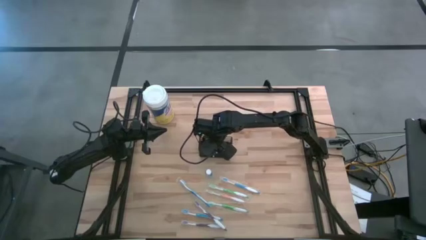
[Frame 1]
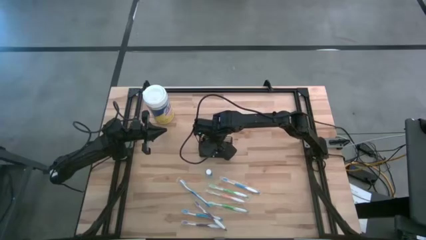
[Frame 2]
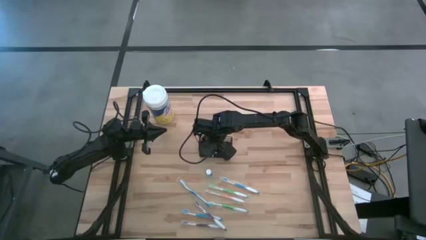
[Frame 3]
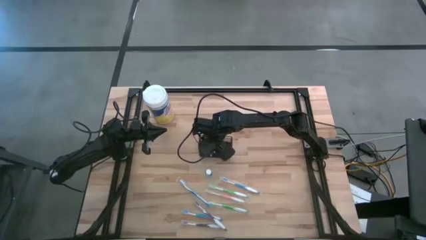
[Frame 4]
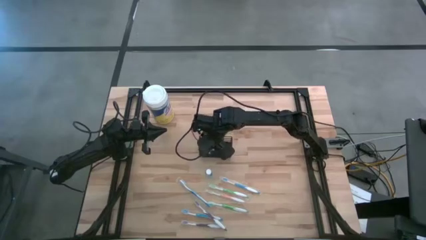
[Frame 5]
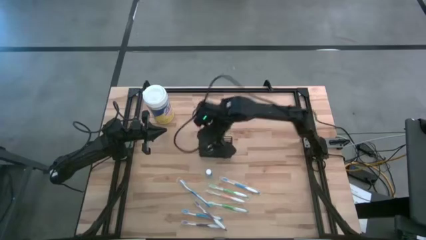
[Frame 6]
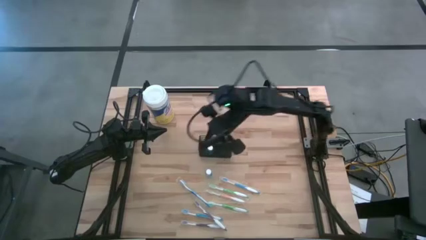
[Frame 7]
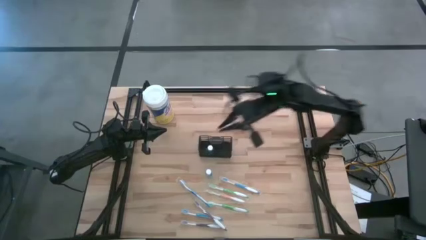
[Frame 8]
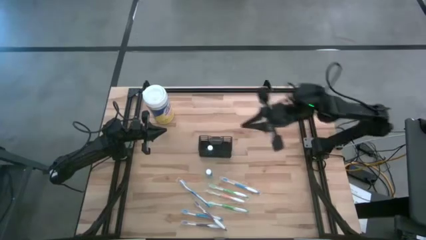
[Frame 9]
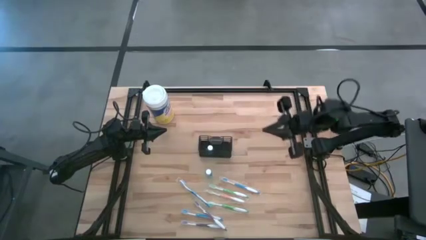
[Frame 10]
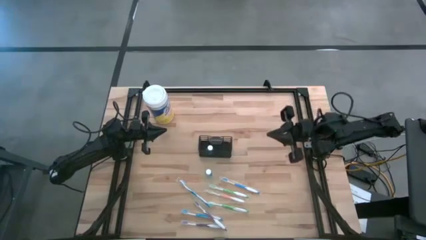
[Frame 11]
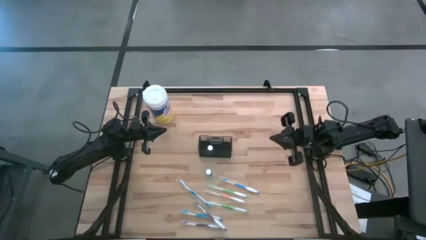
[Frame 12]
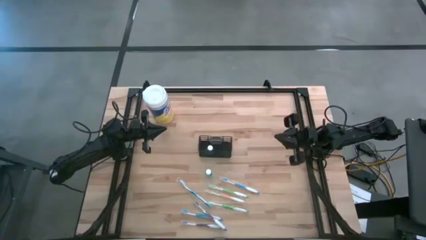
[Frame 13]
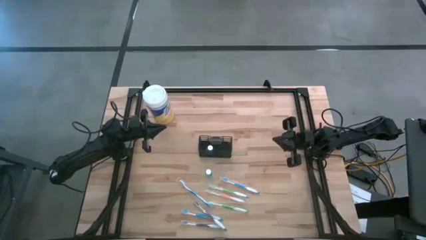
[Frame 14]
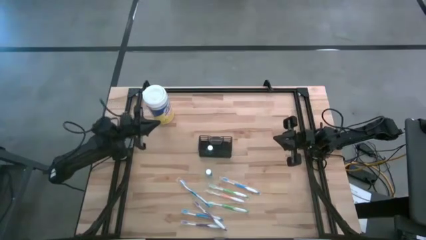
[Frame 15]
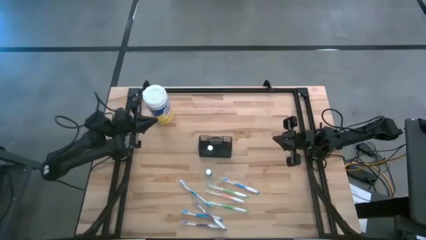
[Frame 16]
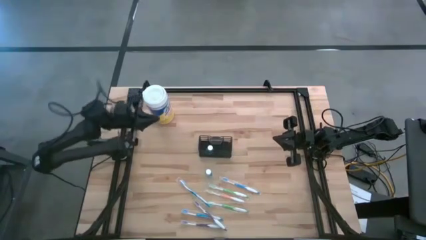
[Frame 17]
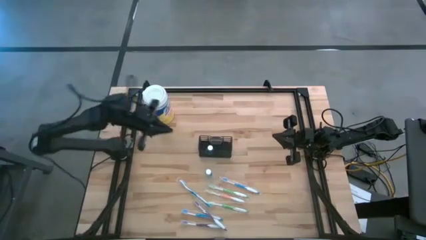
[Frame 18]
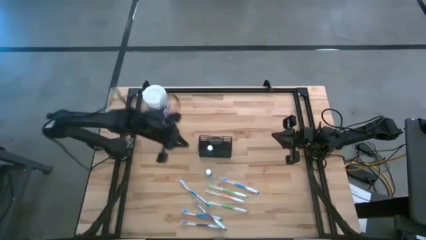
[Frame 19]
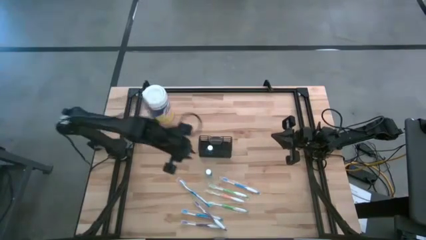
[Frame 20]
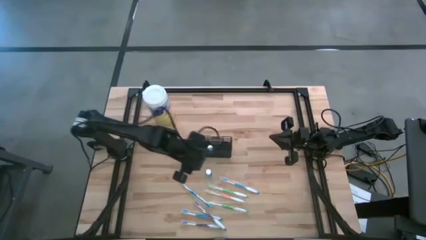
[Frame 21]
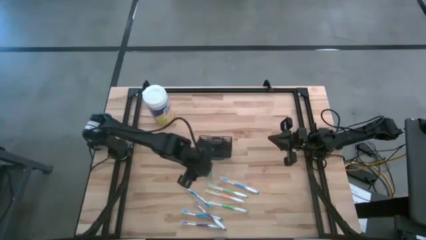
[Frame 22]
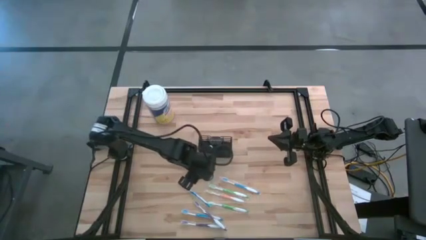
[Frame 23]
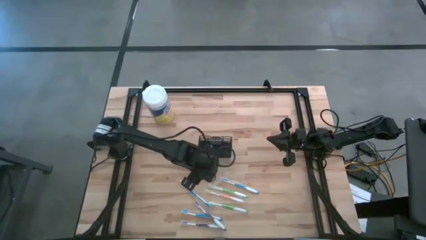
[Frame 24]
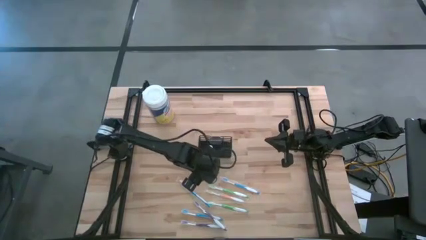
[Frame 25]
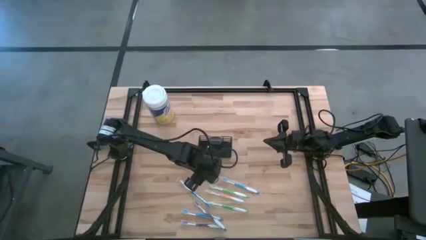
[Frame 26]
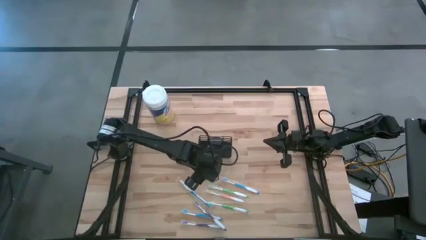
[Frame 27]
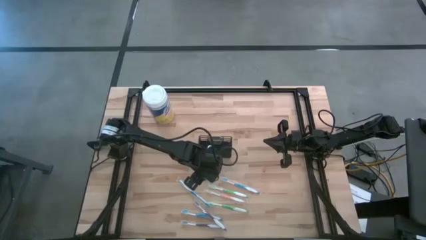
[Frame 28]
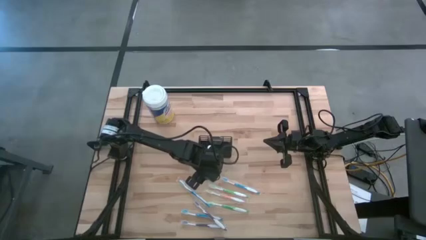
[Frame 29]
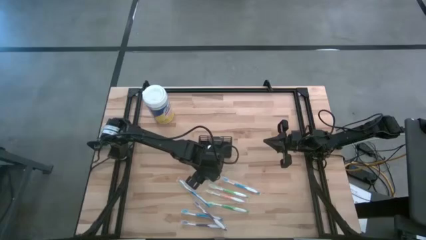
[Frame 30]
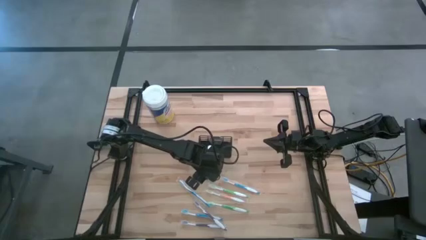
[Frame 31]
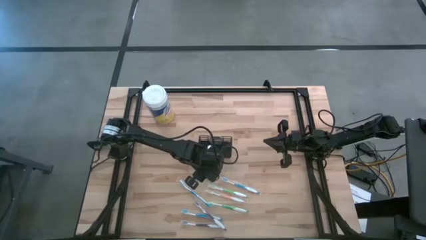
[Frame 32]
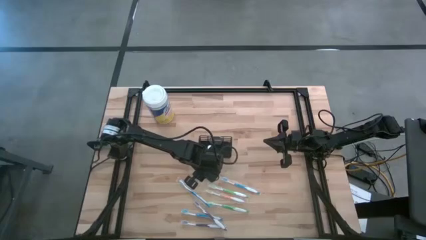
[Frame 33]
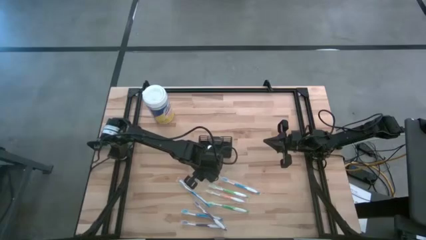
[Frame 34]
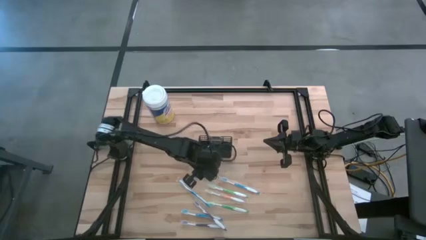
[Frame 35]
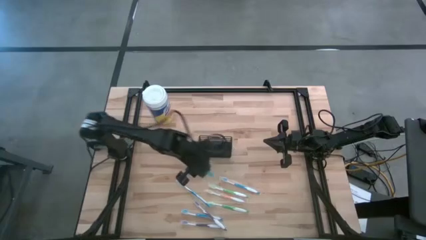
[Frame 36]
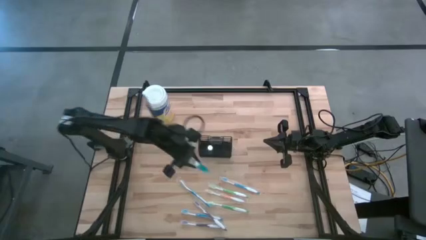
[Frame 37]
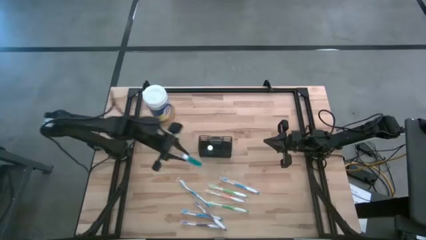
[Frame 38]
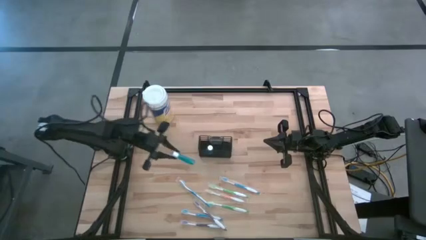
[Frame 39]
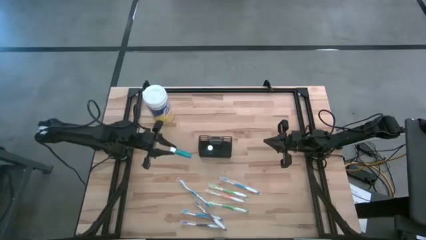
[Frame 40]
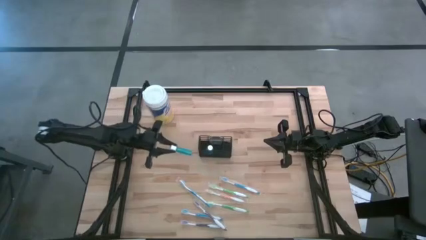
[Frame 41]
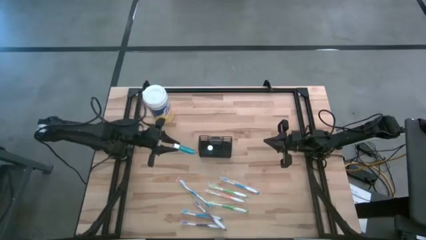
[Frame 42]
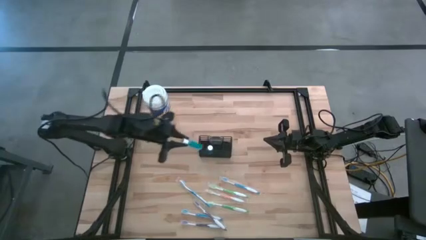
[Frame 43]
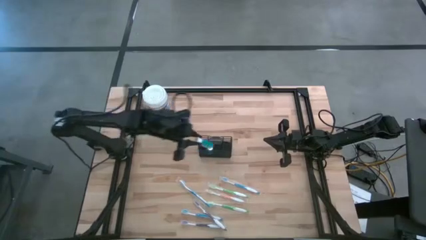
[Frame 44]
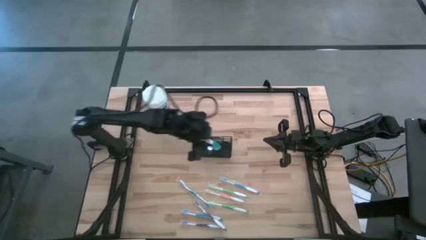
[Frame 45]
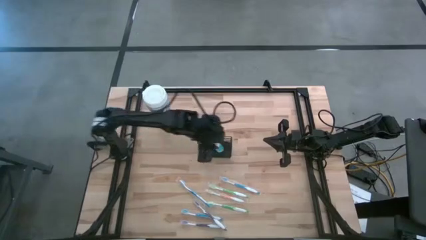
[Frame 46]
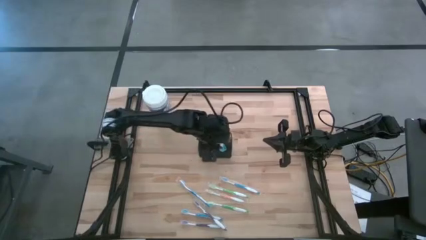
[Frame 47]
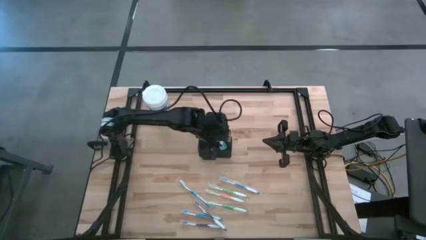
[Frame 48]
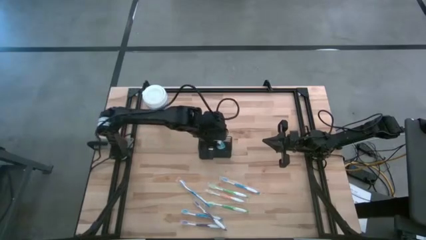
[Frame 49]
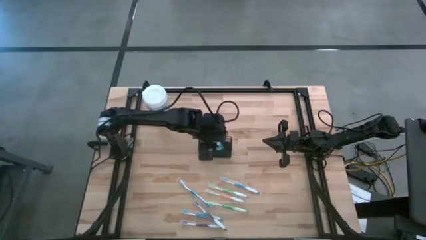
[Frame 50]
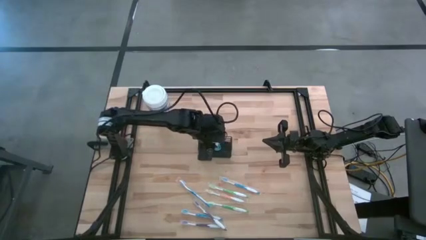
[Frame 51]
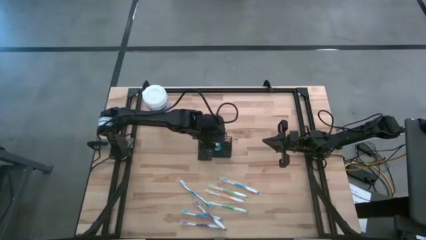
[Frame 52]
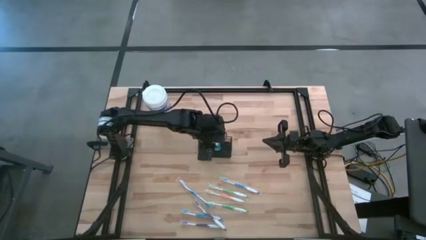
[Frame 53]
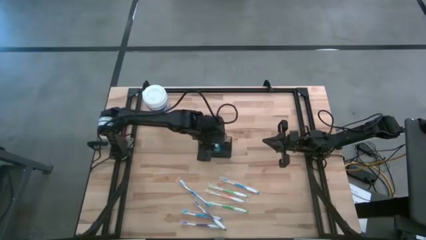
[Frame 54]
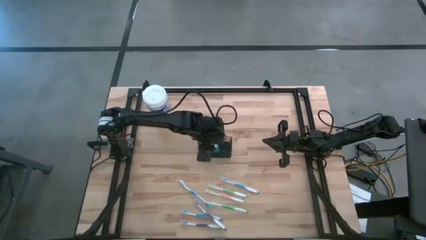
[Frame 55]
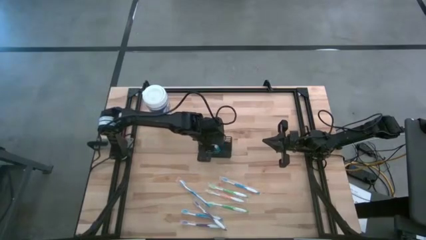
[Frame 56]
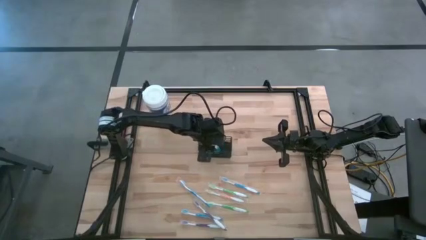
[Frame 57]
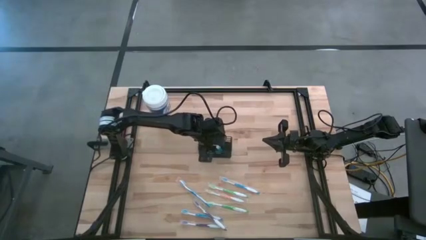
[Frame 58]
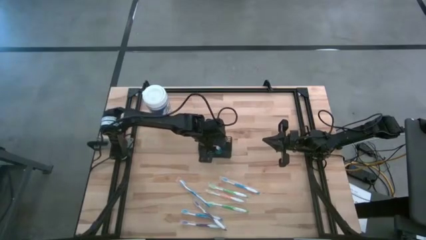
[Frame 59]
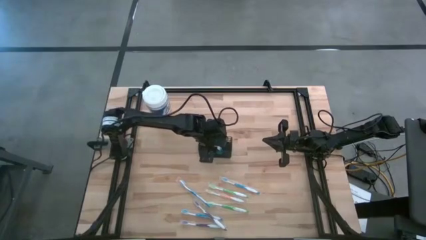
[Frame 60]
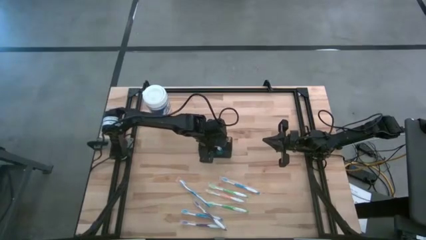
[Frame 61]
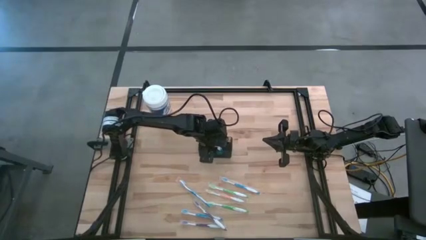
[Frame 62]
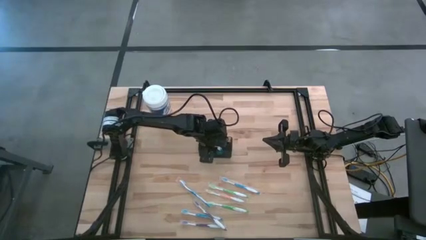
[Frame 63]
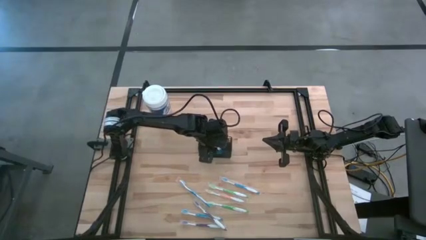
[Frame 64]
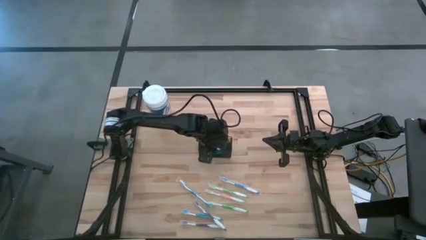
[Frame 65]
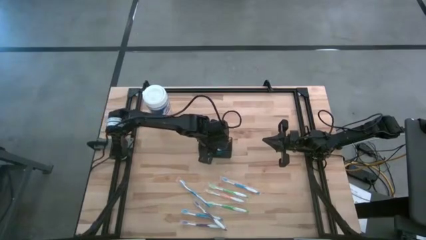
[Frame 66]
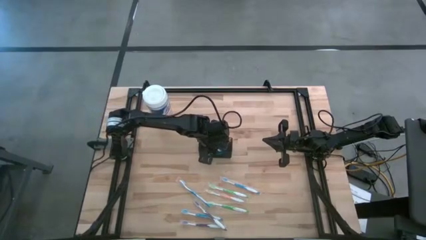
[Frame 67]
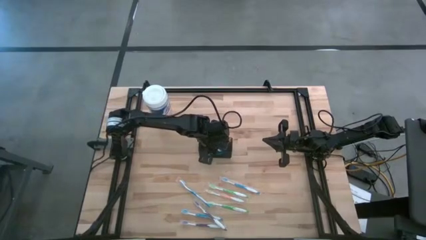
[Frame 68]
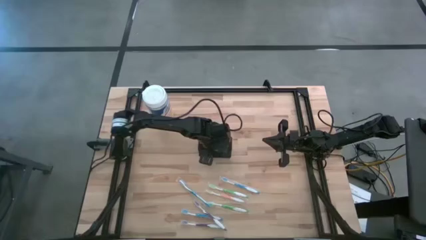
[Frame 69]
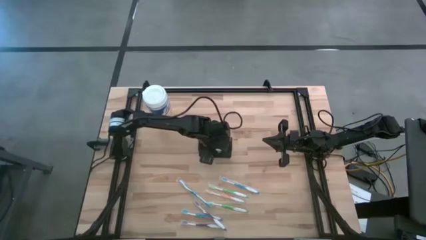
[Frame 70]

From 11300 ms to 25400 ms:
Task: Pick & Place toothbrushing station
Put the blue mouthwash into the wire organizer
